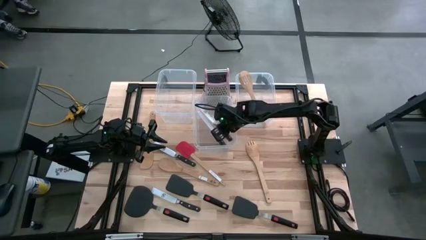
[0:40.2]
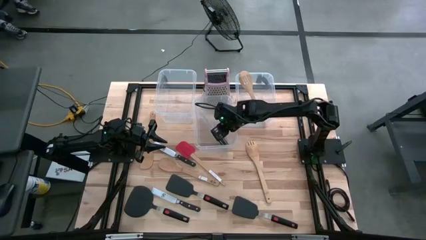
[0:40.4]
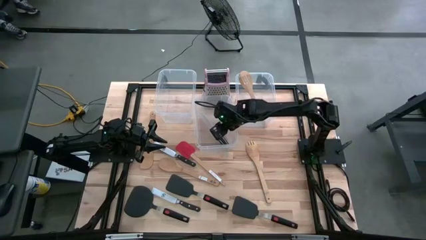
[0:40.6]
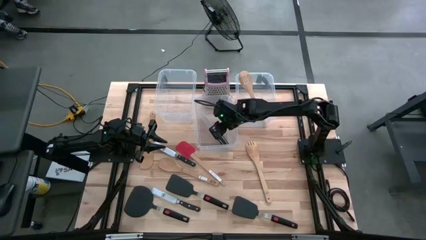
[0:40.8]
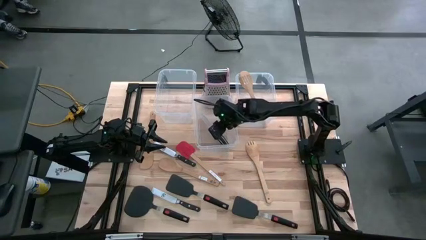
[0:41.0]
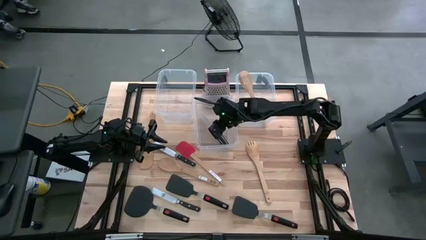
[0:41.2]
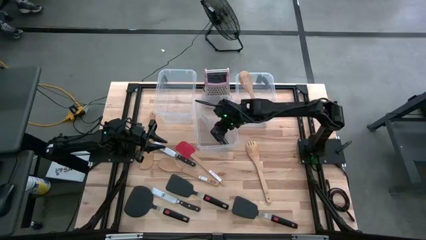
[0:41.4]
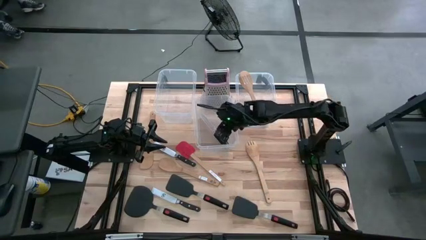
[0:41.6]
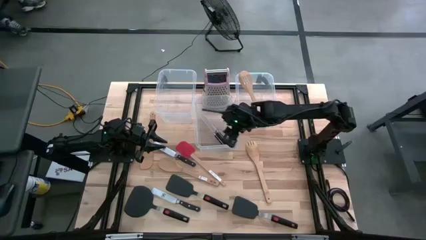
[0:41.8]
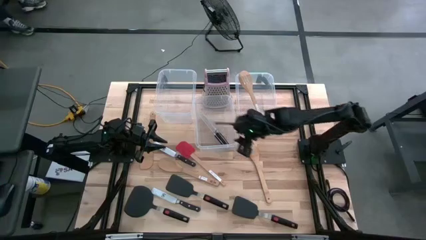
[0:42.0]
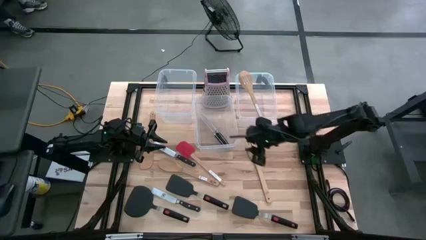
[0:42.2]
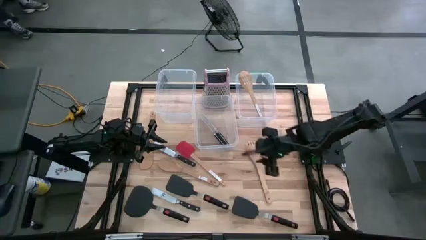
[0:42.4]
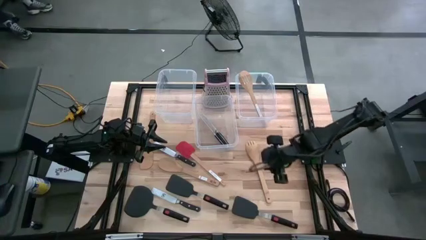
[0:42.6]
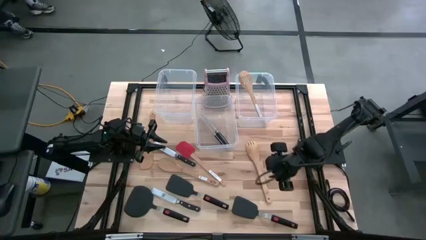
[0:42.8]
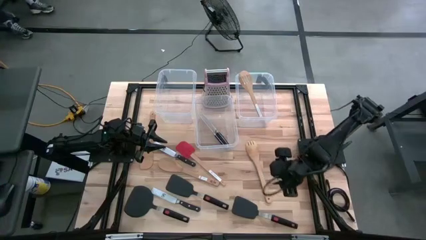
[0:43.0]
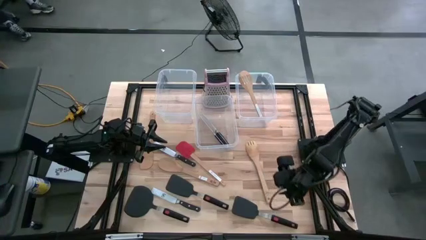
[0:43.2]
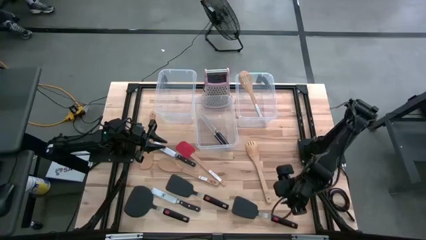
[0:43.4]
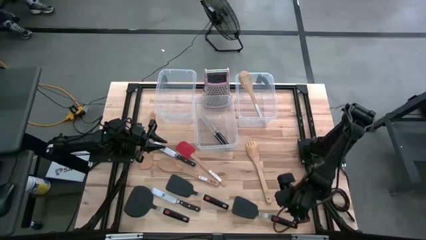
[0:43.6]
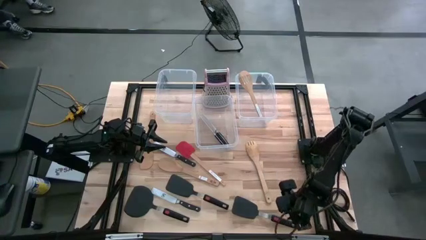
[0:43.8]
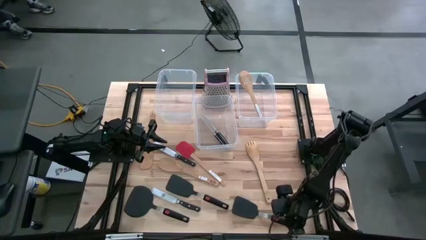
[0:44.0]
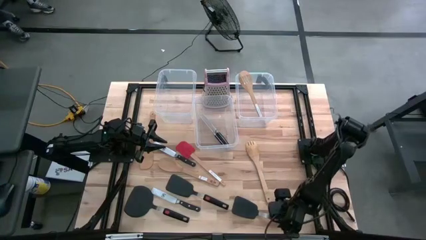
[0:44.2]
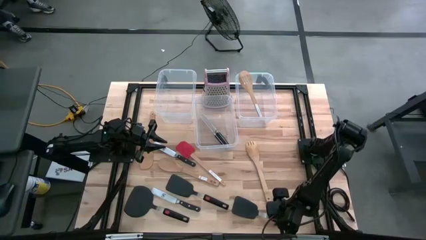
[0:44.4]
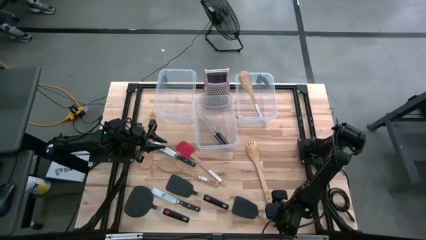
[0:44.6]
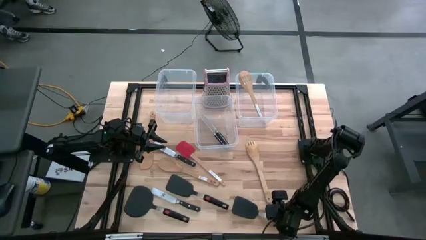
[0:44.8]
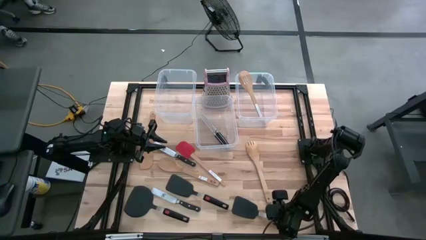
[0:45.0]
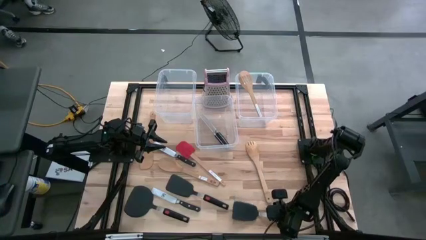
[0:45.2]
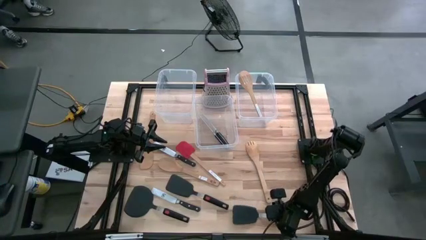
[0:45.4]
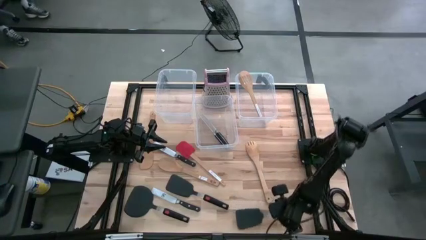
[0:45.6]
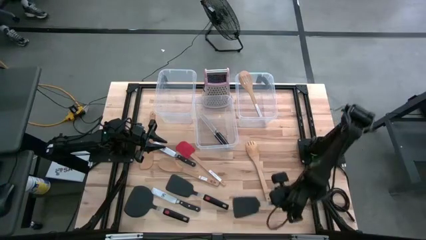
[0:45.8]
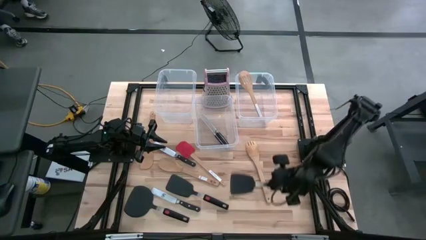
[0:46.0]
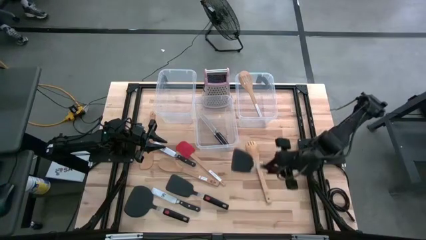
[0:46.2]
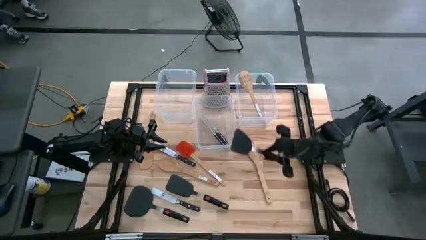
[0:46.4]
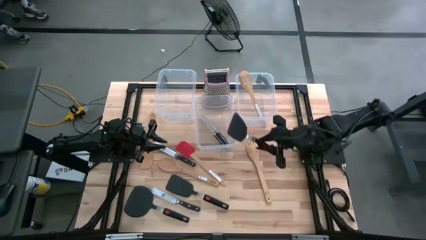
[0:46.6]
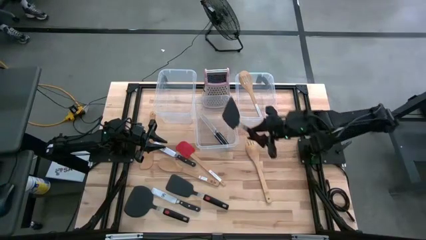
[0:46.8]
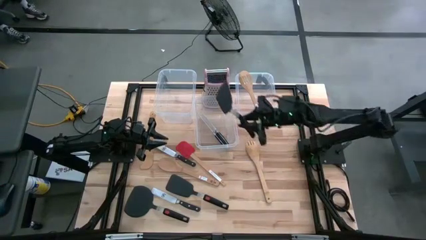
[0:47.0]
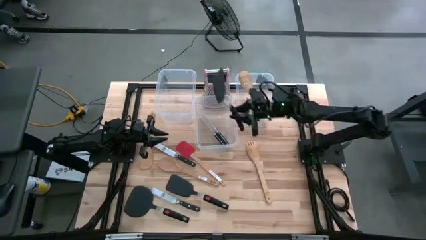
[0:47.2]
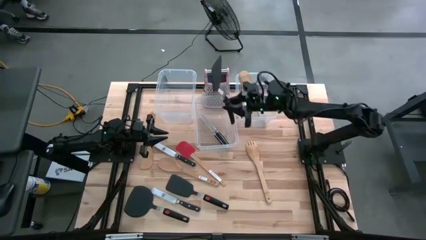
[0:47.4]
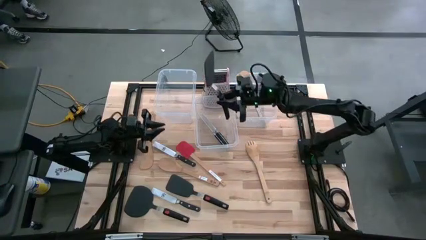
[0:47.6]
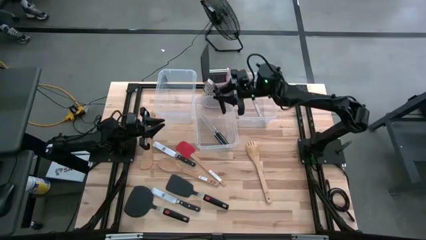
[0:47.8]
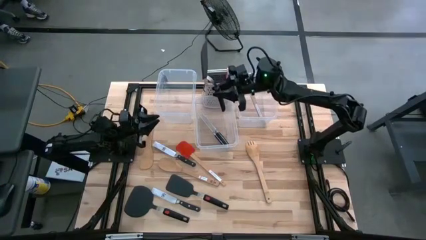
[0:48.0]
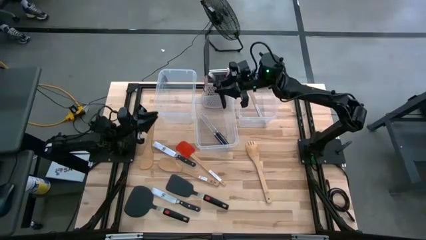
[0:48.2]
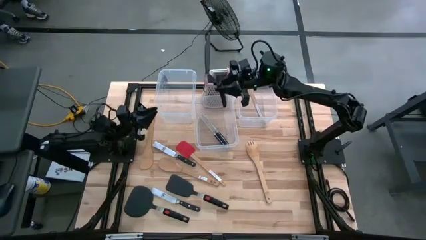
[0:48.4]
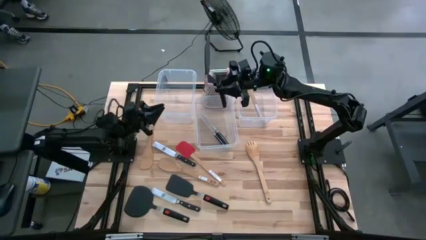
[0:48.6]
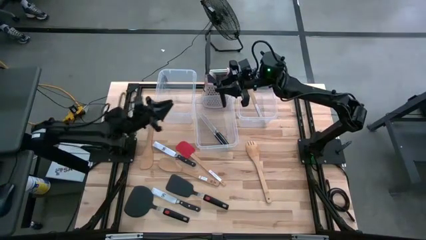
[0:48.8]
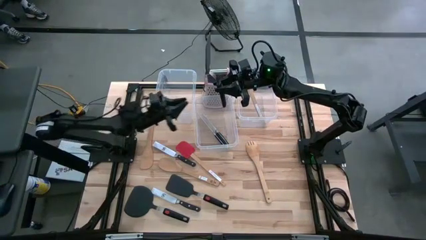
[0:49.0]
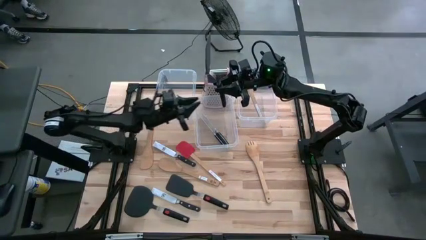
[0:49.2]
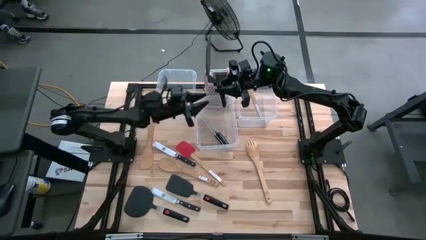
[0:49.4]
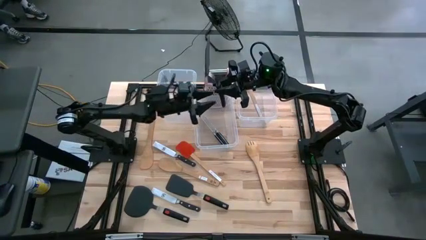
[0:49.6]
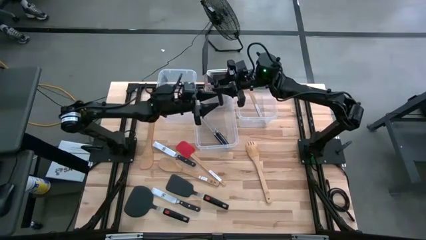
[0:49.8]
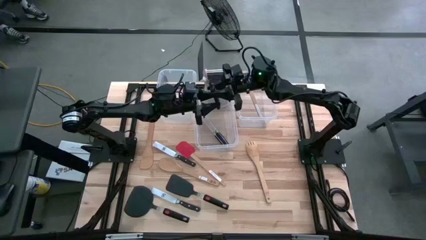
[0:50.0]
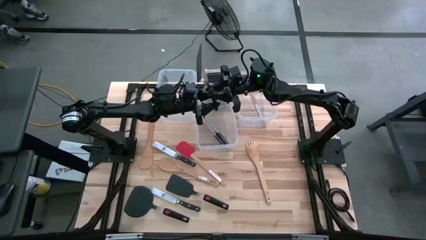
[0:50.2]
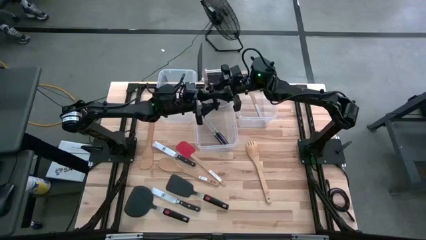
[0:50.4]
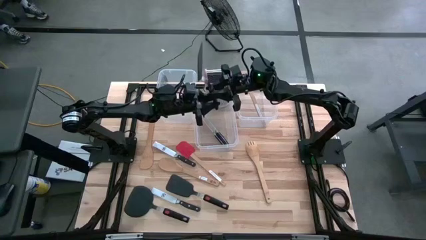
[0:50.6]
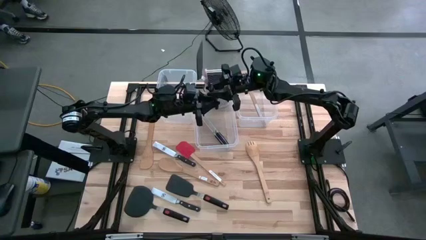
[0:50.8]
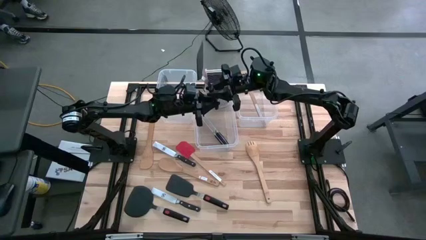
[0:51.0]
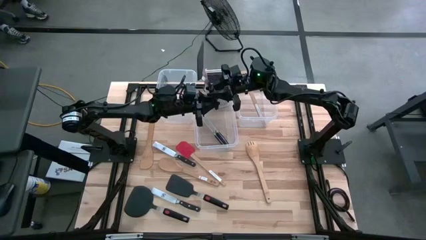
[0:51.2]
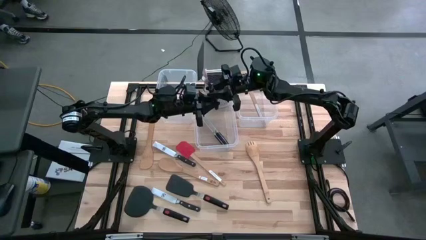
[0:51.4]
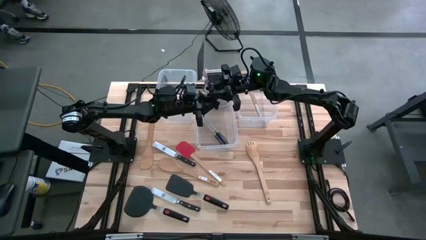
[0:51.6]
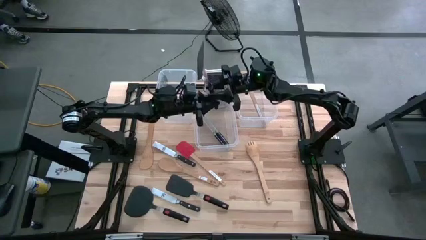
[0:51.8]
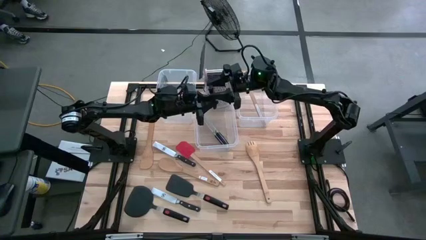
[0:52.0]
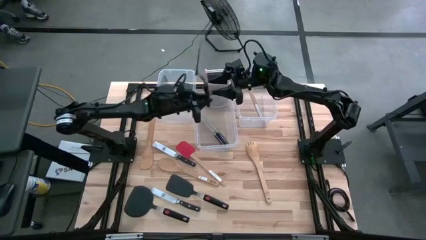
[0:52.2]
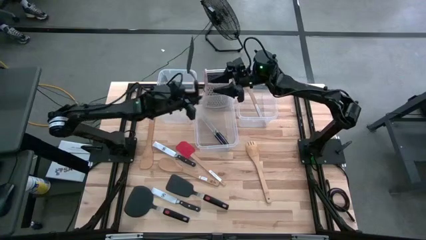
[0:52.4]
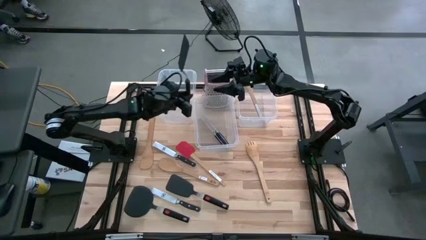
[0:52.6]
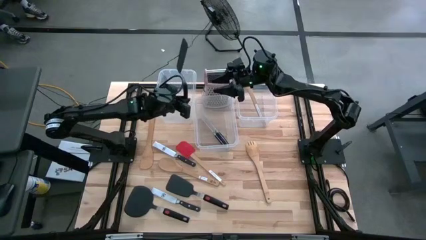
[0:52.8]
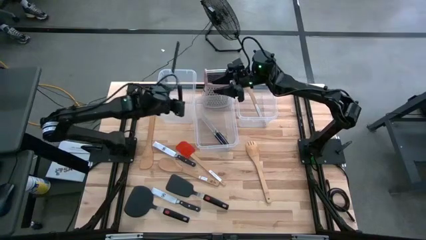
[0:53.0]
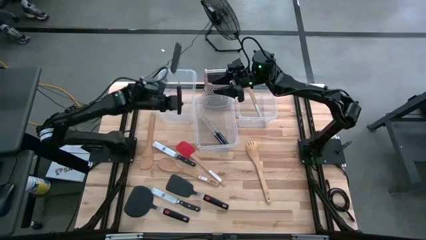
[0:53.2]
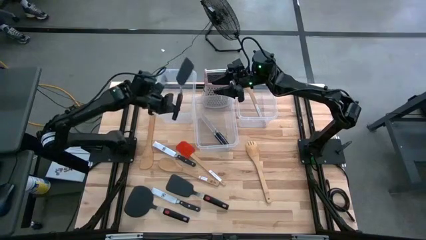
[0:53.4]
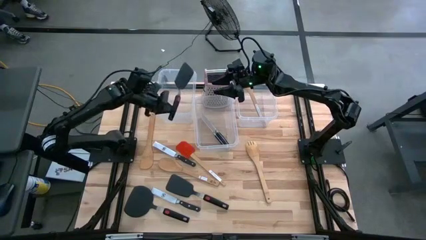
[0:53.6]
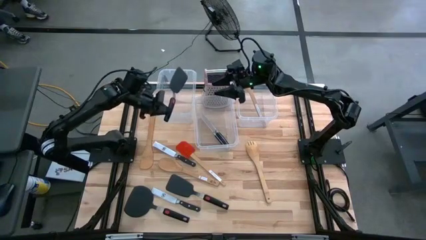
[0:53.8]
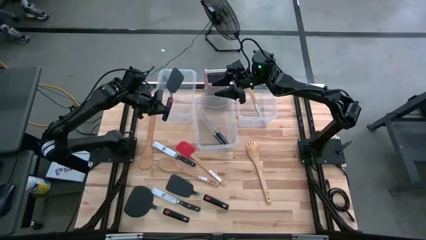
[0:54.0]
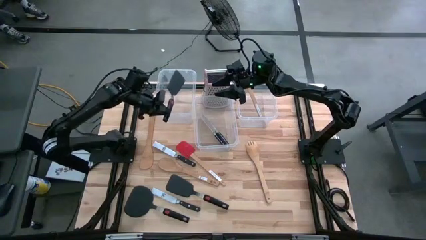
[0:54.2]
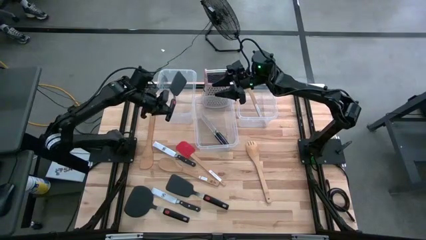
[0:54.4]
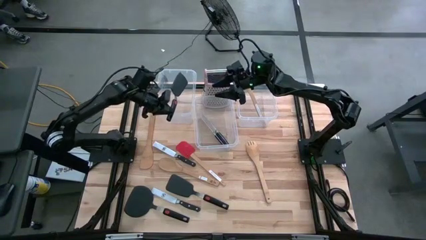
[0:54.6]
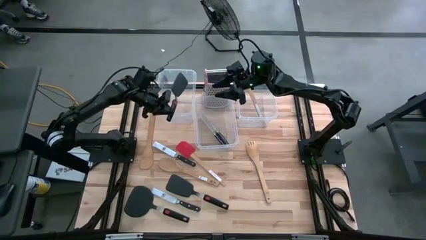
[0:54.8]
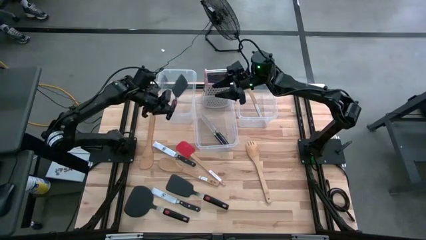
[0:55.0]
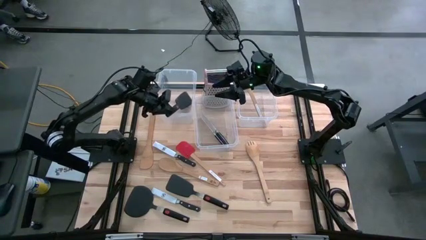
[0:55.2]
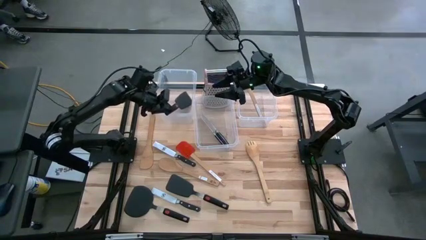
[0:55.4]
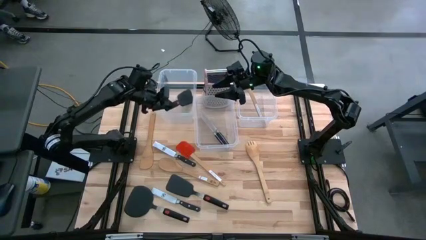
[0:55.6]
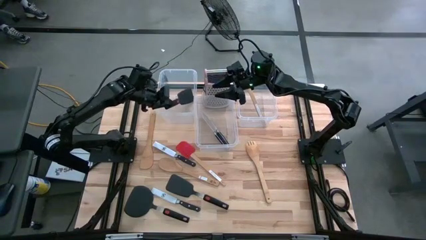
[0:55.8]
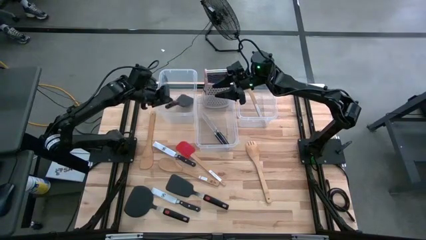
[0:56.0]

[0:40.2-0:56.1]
Task: Pick & Place Kitchen Items
Put the black spatula into the left transparent bin
